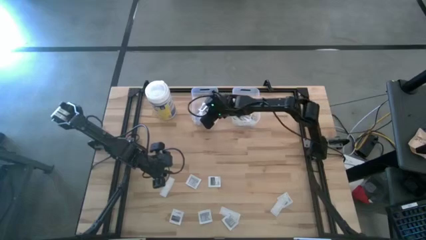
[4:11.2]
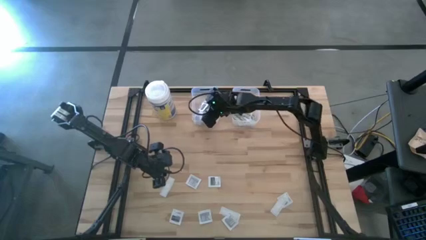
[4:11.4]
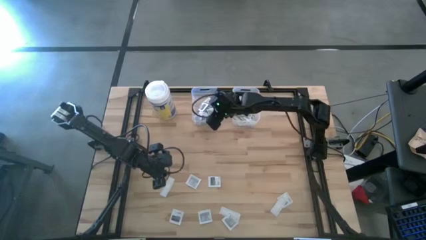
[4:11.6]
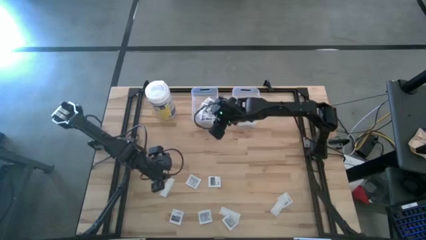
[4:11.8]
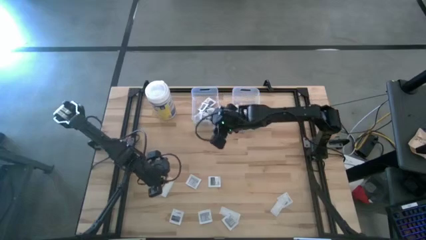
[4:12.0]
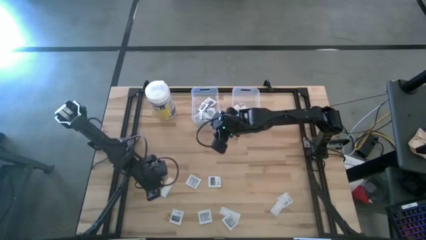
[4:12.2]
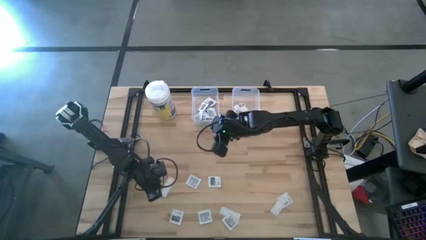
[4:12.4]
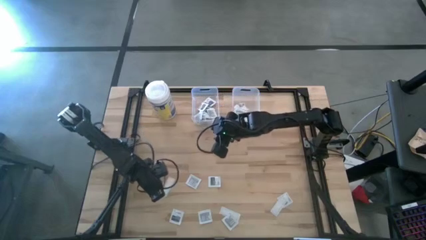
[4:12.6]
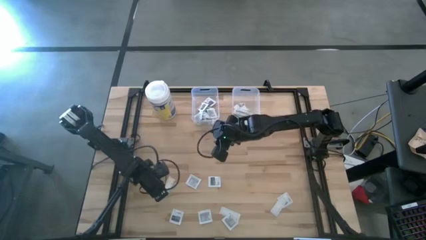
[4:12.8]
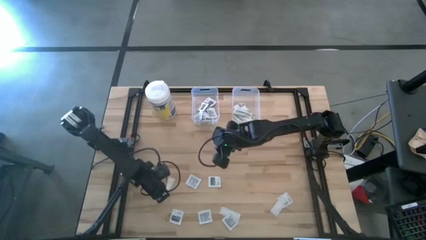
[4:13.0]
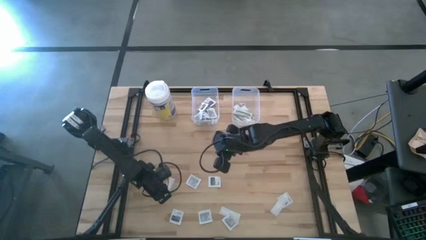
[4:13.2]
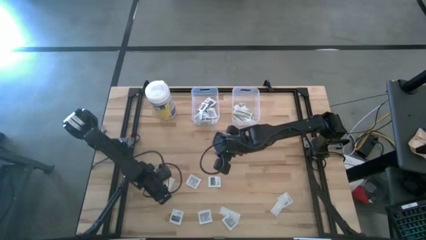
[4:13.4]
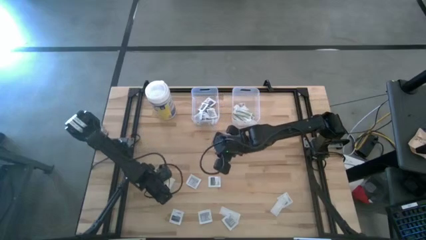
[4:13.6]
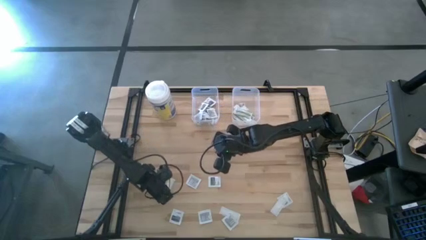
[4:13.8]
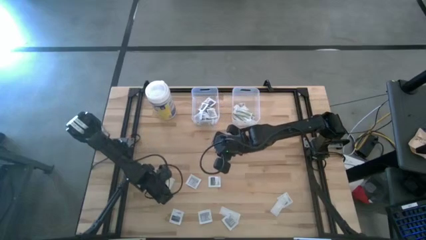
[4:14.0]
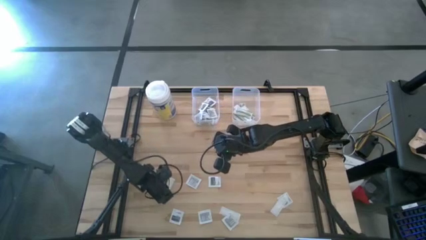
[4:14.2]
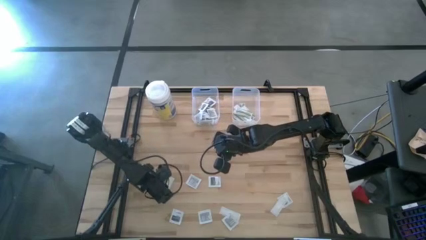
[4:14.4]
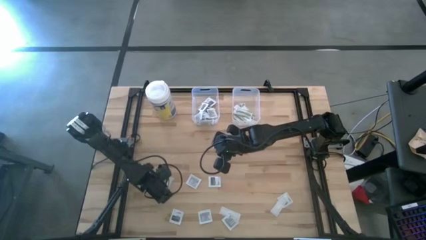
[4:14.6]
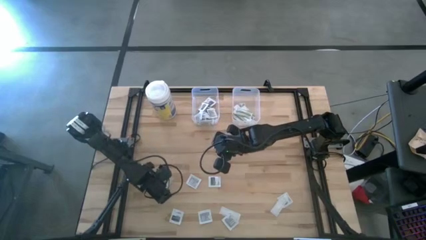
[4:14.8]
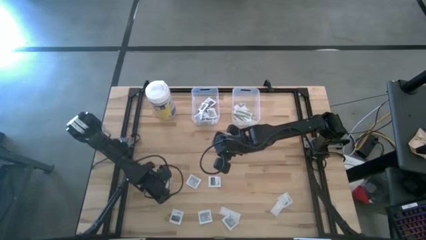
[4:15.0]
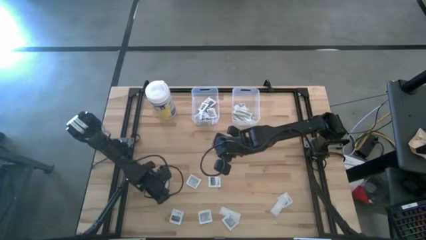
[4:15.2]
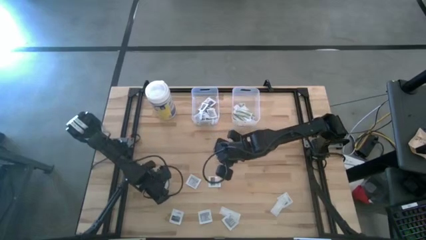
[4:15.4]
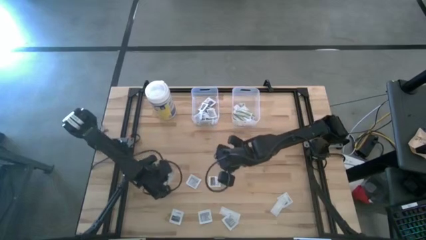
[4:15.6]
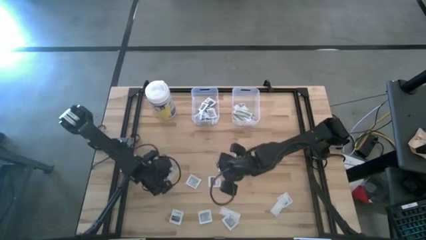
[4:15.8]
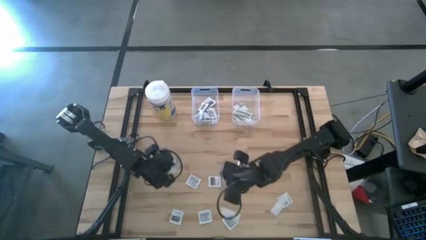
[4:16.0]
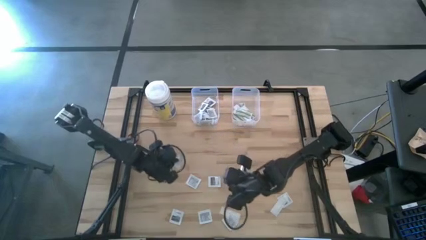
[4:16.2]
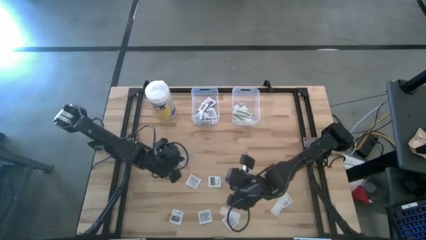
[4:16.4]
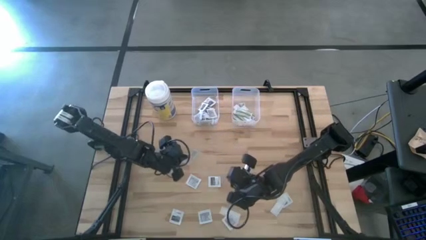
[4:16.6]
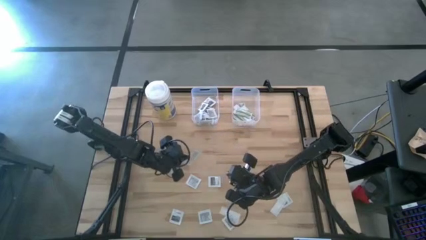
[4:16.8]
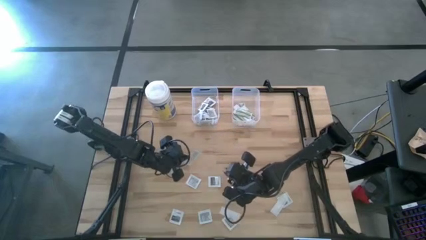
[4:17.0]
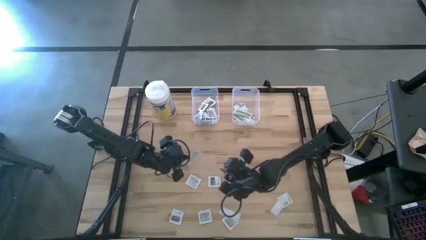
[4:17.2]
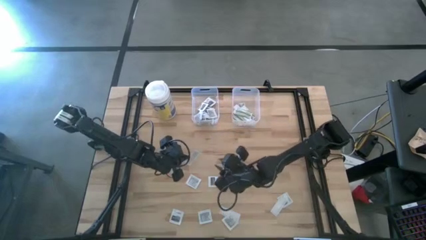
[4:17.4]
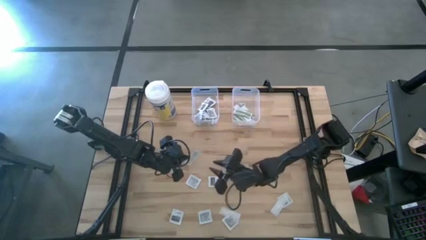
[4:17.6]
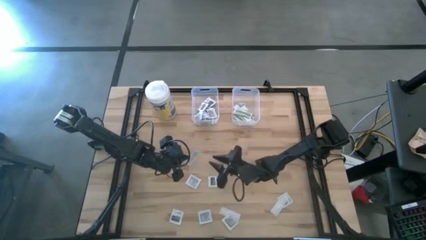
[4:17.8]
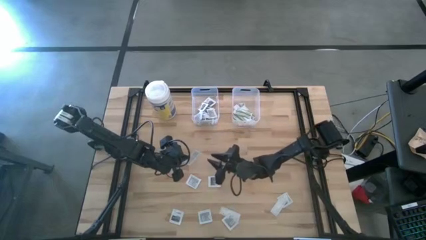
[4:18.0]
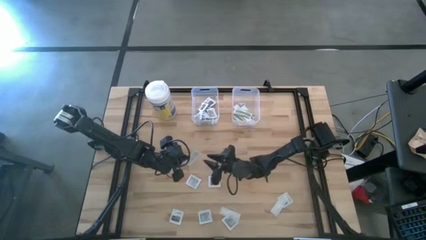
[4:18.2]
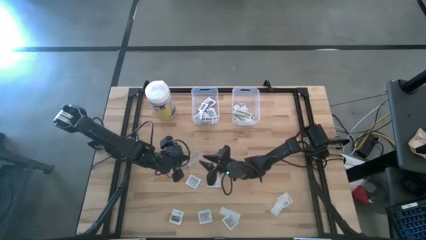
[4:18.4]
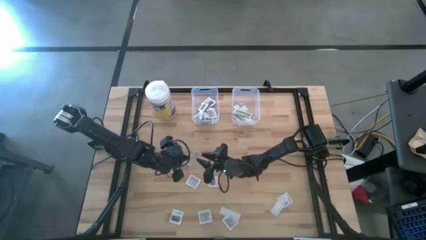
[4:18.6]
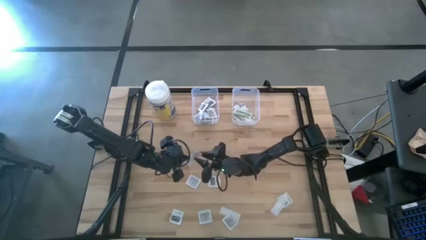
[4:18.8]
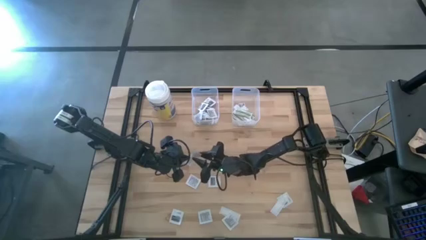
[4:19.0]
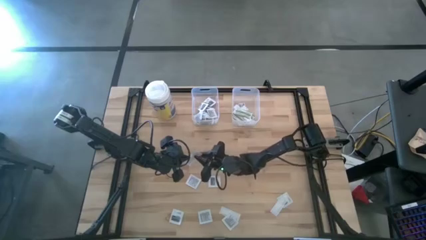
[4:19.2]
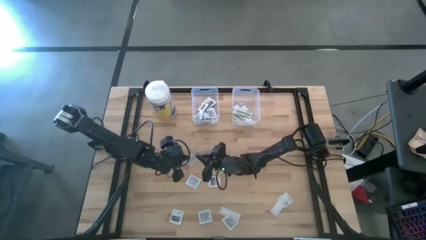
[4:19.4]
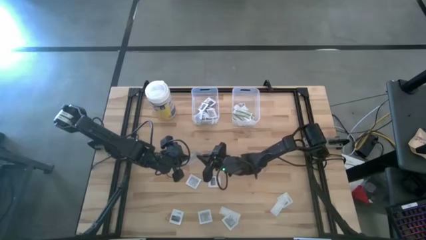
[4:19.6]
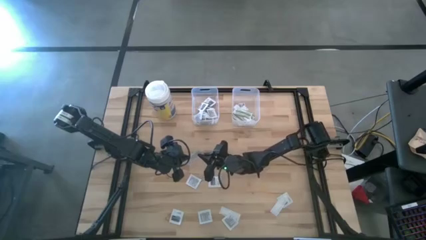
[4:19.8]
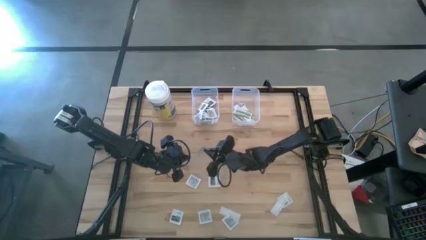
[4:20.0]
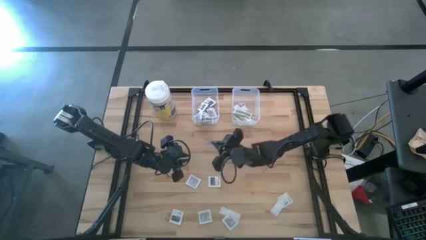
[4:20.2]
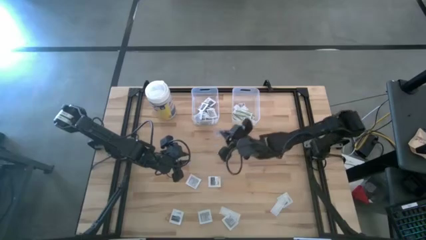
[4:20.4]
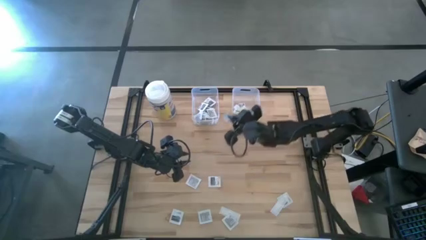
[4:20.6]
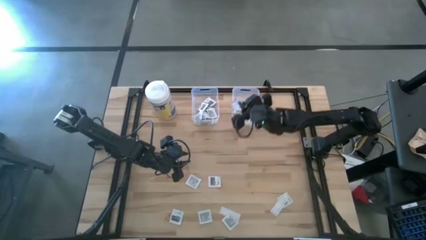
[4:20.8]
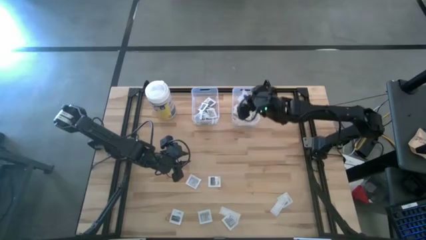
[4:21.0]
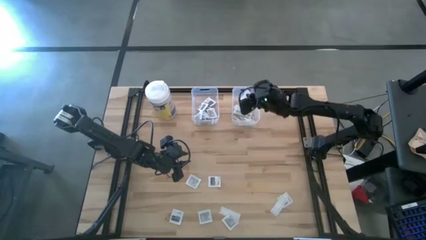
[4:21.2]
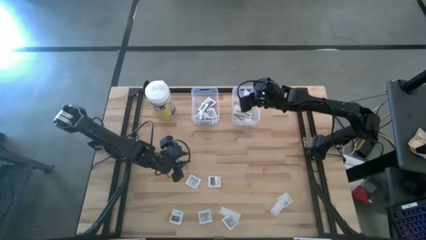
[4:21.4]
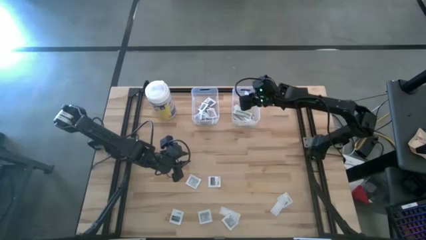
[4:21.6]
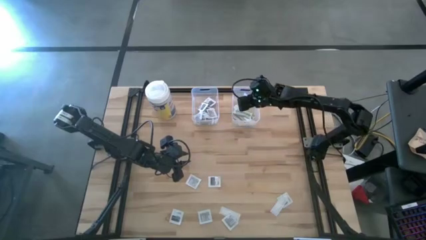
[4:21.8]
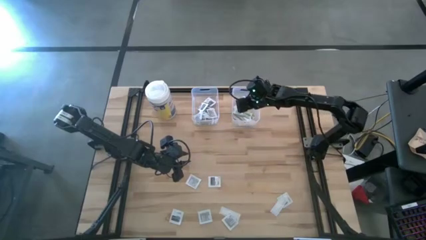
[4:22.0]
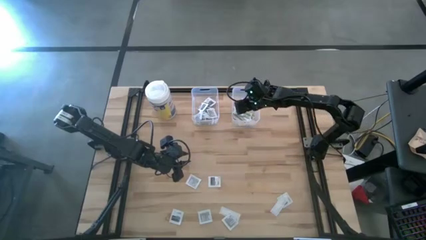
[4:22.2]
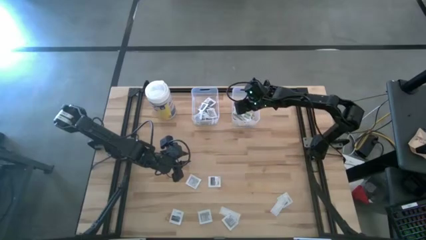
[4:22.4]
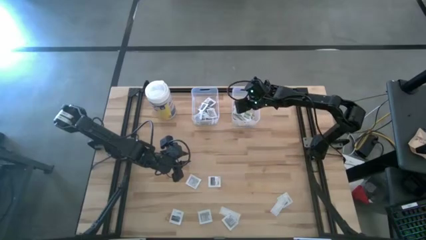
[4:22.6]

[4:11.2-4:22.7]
Task: Pick & Place First Aid Supplies
Put the bandage into the right transparent bin

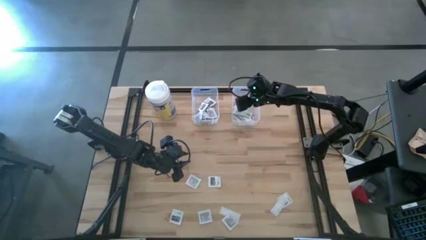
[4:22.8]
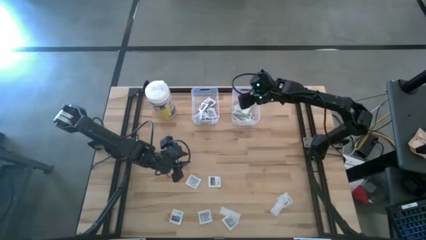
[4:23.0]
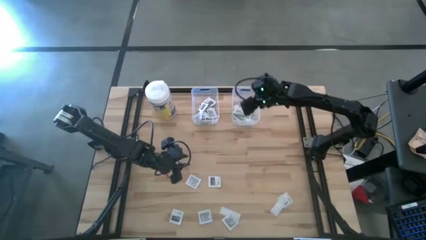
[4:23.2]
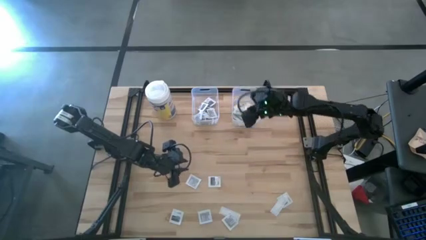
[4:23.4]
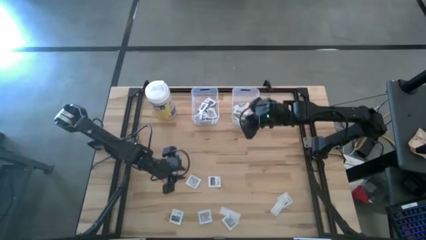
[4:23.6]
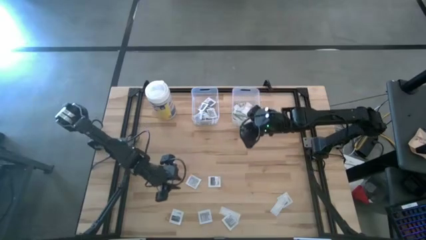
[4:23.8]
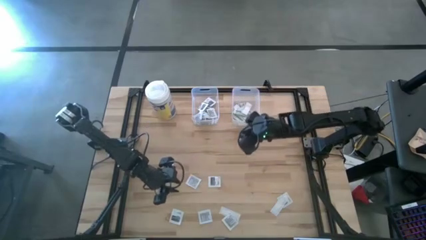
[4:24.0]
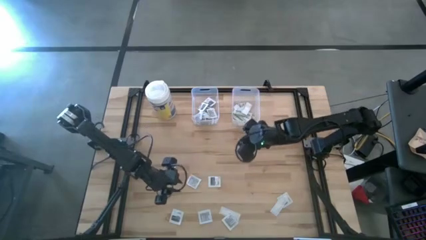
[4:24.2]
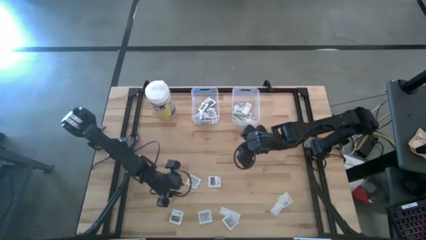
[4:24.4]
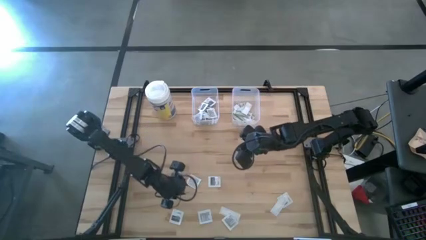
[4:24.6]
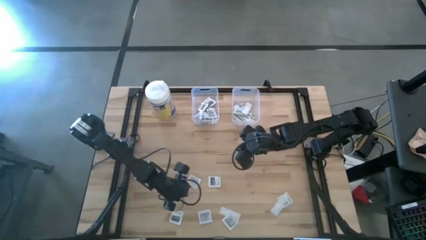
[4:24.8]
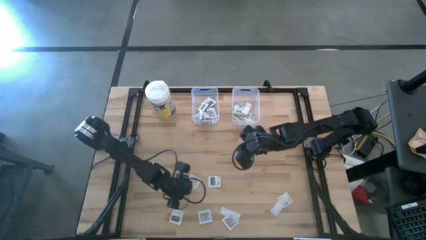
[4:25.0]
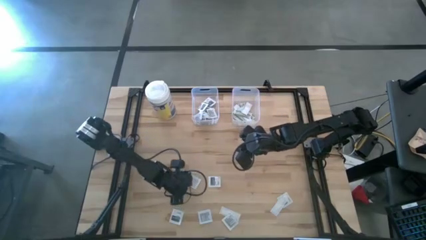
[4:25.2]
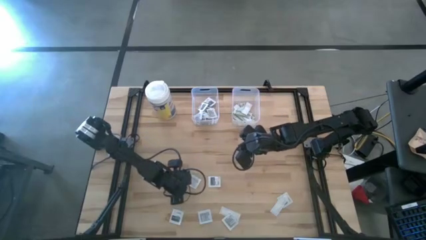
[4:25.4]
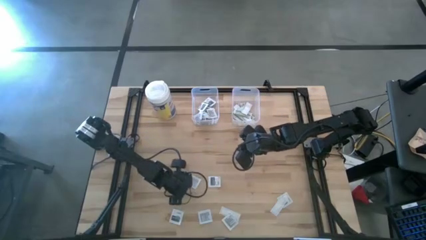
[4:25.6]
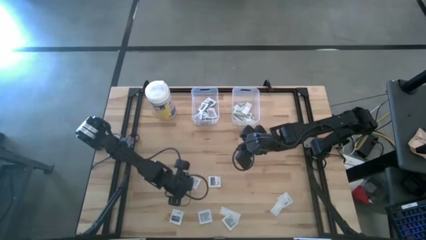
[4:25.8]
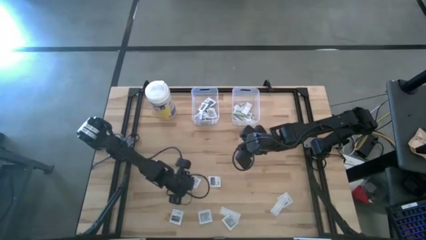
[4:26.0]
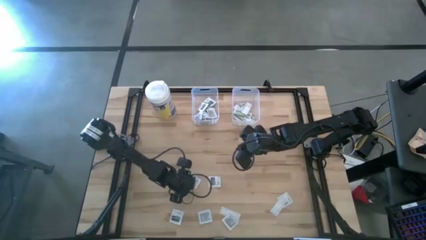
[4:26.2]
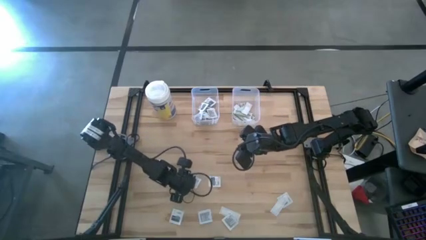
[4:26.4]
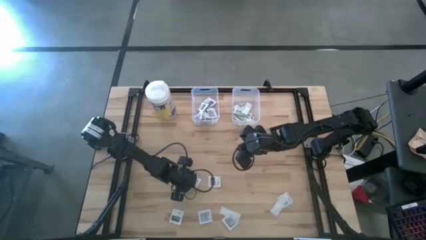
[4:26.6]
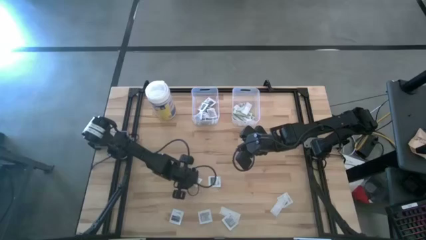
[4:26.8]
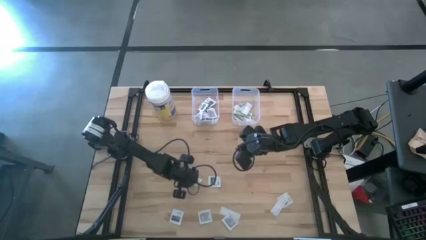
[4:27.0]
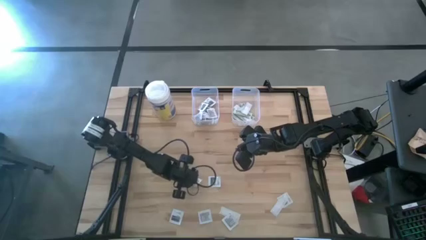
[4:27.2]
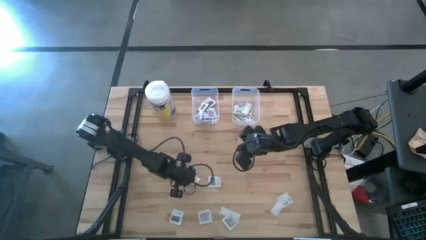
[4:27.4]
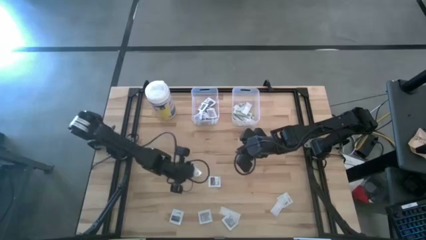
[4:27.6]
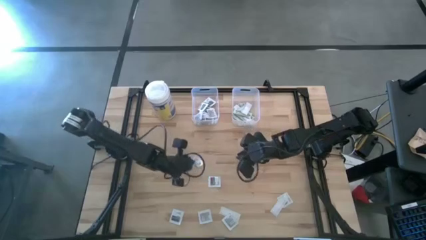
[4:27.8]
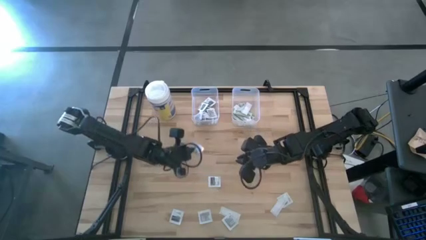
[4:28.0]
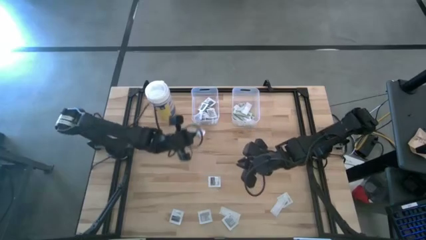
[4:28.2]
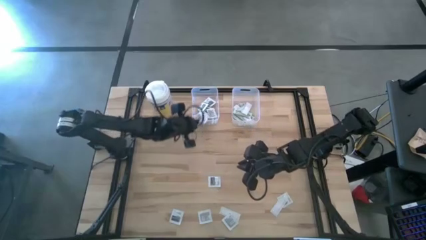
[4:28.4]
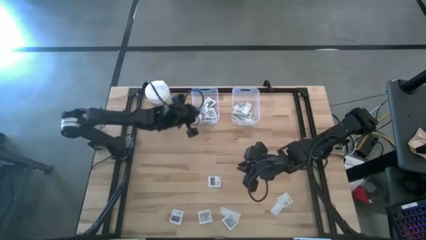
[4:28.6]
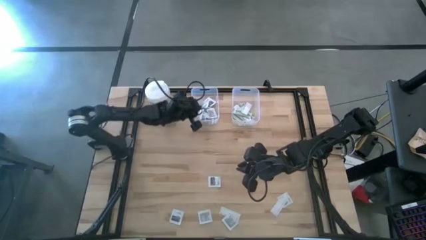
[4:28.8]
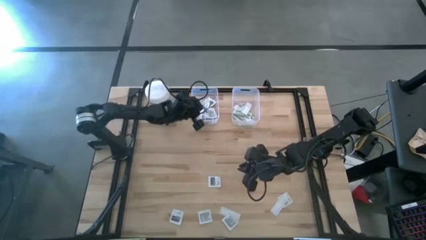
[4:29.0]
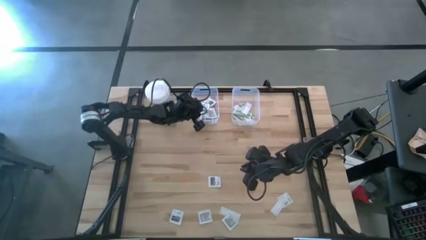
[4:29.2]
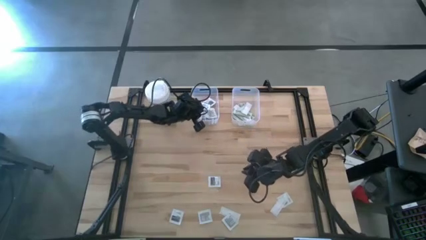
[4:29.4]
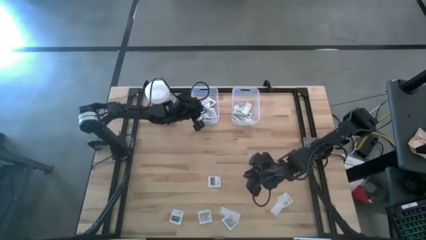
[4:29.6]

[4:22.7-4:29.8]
Put the towelette pack into the left transparent bin
